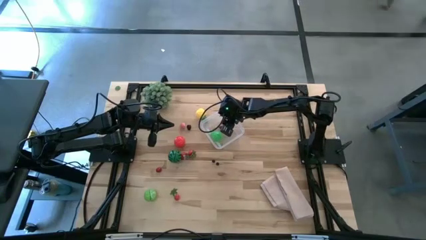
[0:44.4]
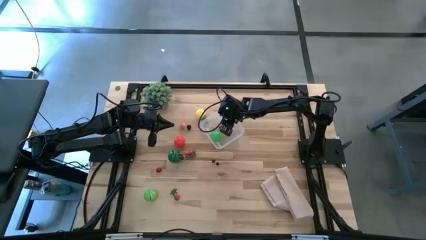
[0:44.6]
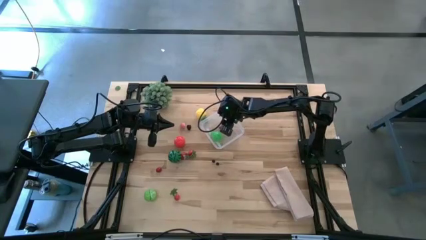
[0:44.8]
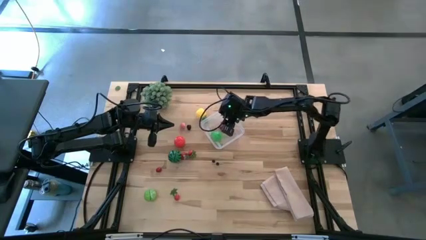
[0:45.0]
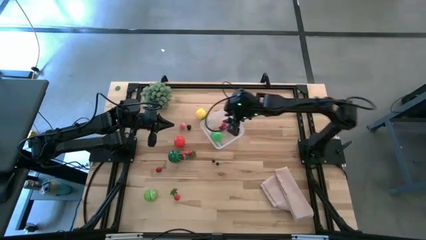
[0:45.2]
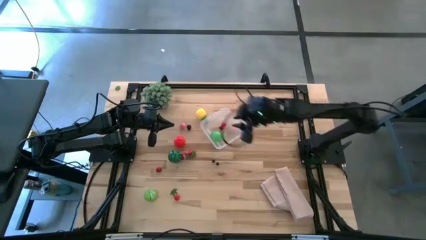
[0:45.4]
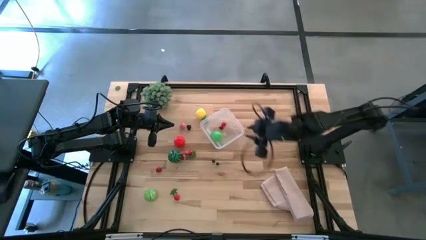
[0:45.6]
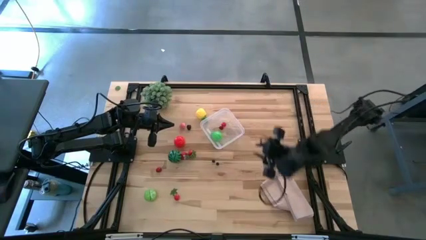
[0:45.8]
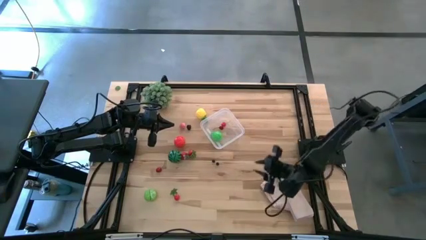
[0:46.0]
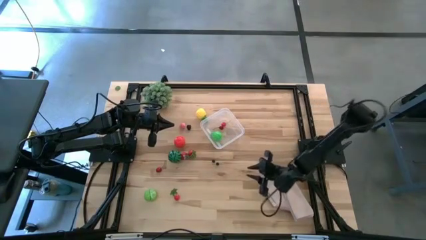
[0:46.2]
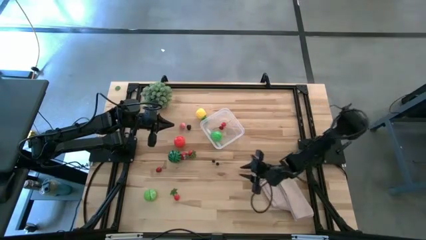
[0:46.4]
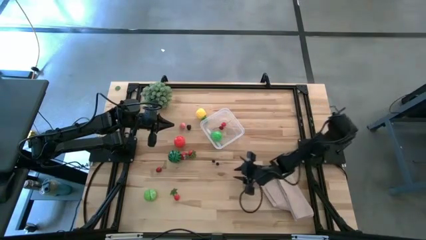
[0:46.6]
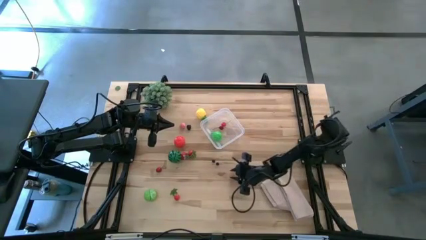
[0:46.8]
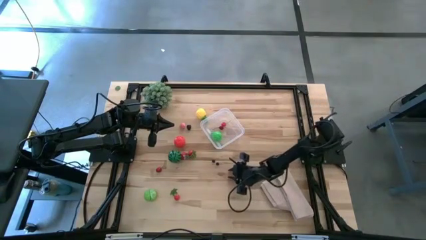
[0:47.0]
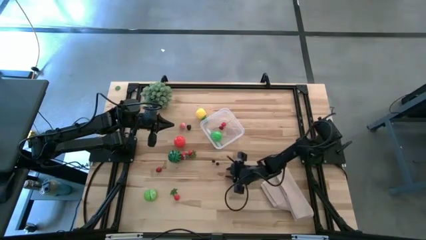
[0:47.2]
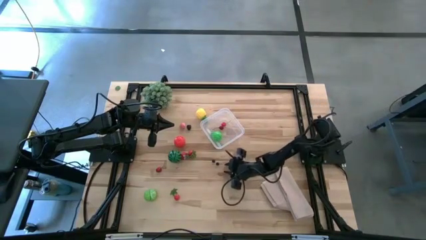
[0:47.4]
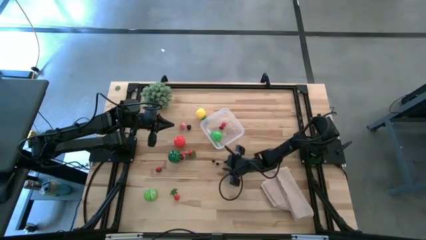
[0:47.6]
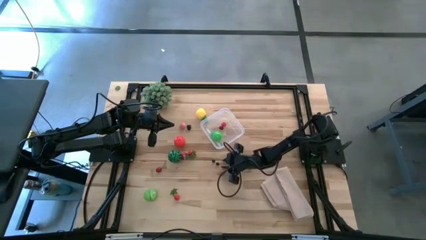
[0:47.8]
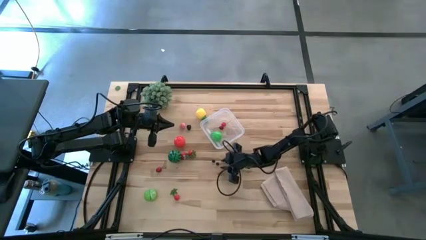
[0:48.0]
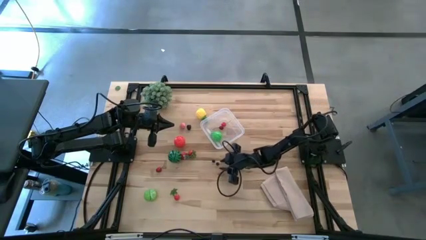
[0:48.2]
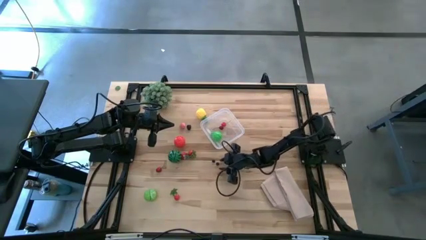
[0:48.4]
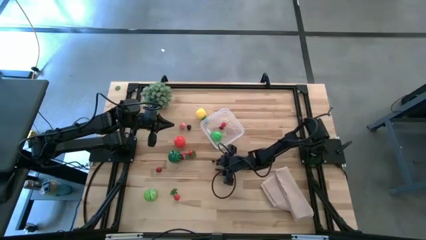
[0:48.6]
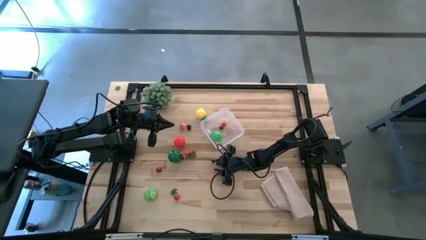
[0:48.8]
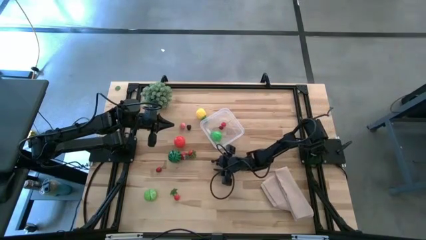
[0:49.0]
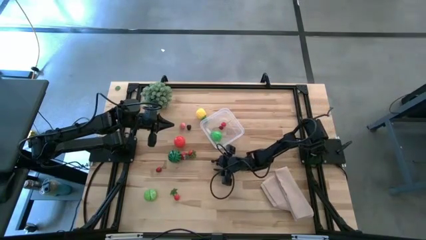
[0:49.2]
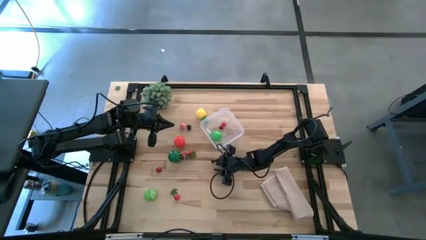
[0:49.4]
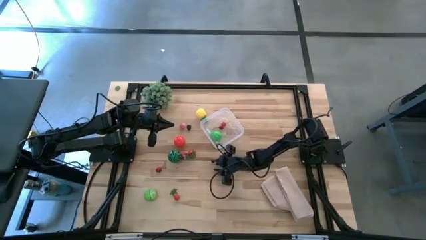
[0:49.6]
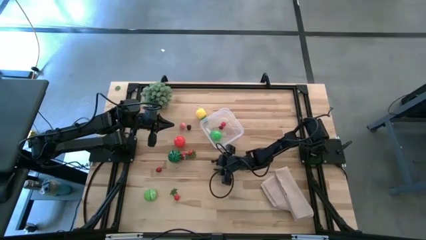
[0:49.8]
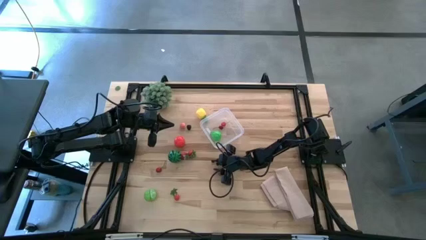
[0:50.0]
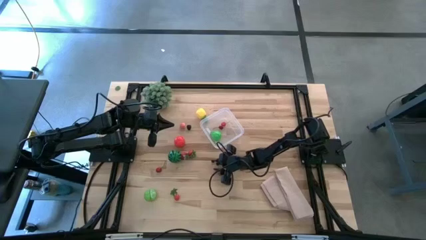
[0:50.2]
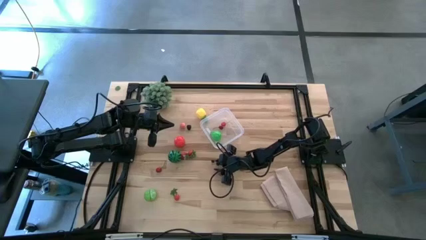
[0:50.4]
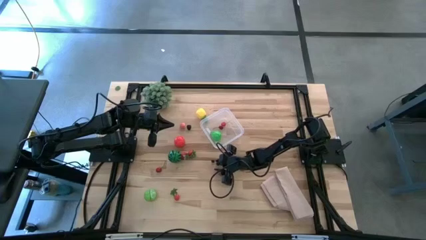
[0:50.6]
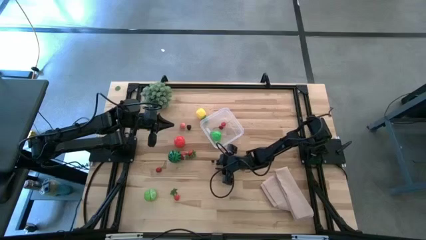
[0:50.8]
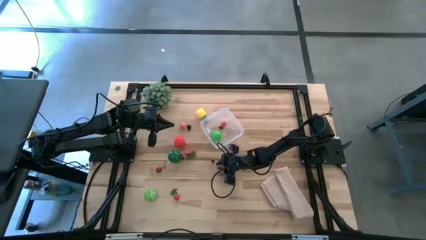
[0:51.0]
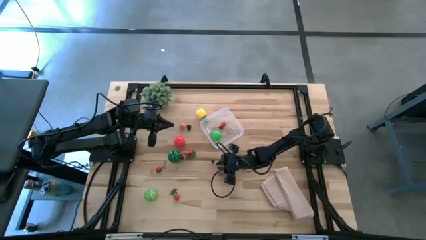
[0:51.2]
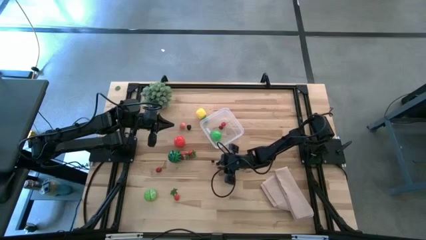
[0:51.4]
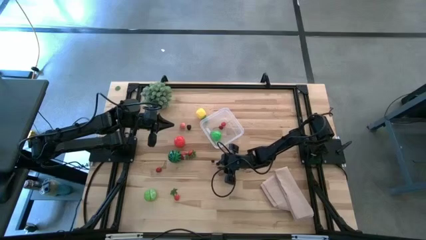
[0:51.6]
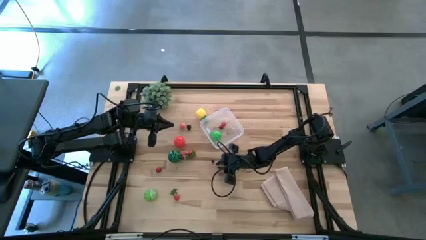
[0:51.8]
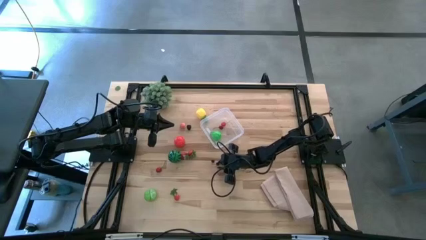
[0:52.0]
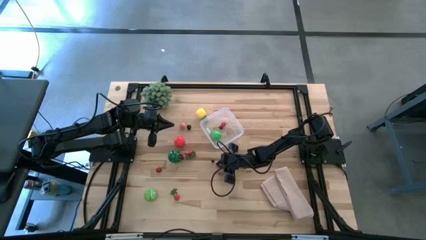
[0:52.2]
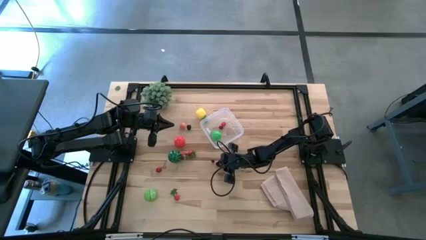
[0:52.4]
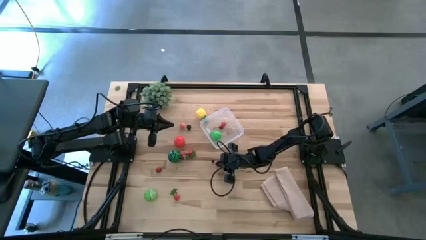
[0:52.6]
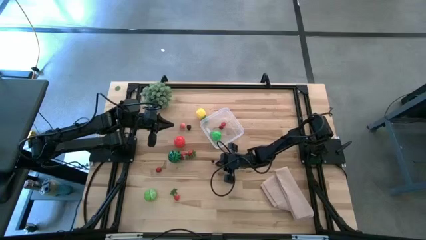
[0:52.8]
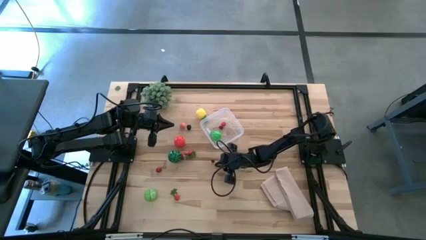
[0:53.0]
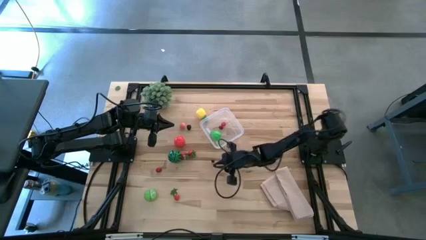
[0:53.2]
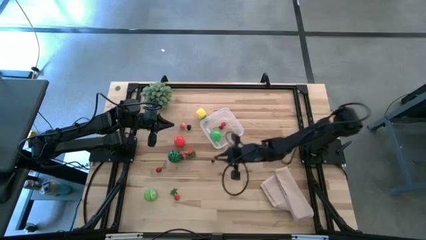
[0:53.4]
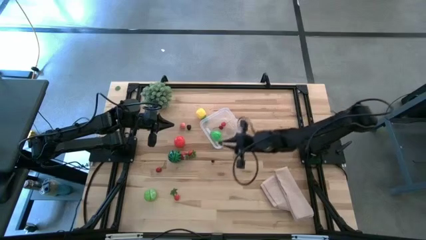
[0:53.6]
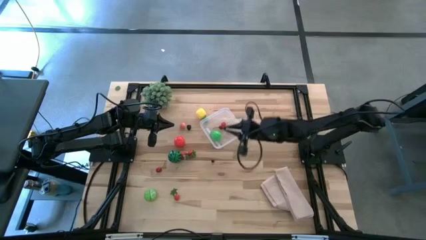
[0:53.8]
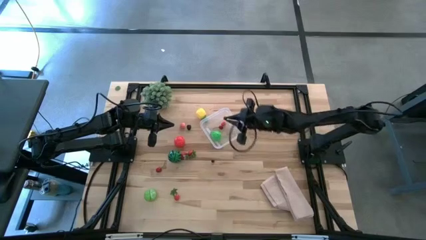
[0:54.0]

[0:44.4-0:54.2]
Task: Pick and placing Produce into tupperware
Put the blueberry into the transparent bin

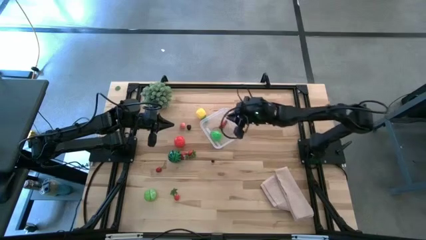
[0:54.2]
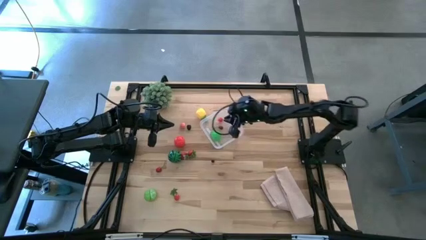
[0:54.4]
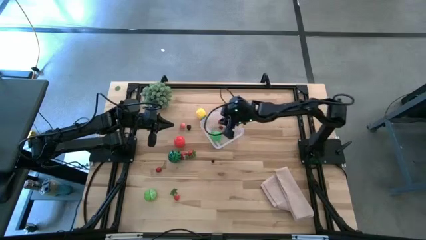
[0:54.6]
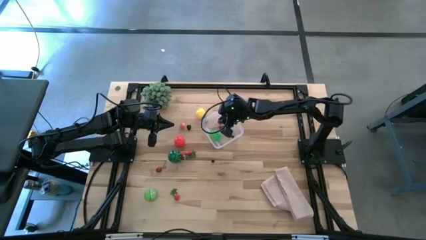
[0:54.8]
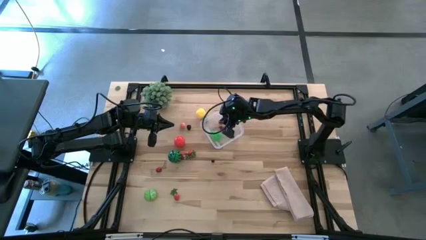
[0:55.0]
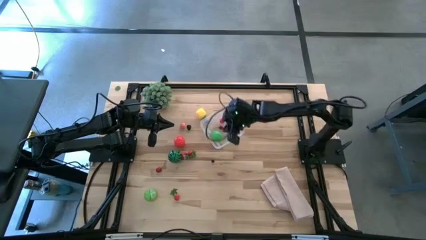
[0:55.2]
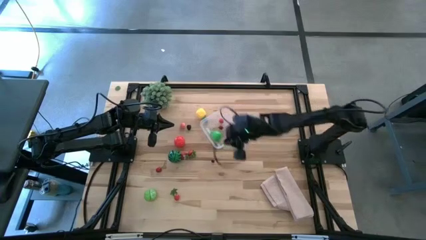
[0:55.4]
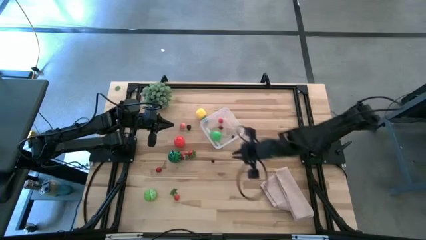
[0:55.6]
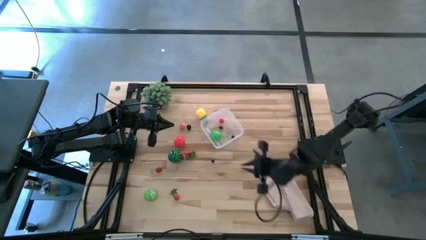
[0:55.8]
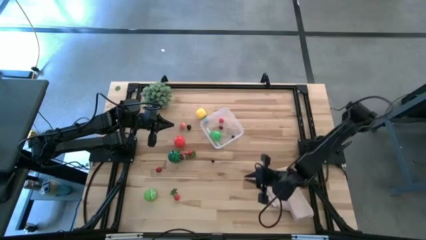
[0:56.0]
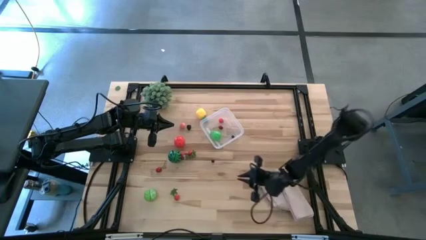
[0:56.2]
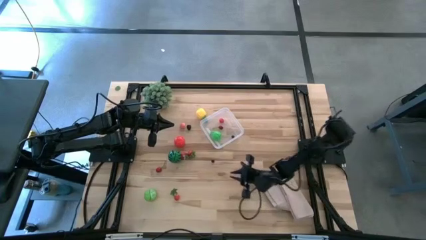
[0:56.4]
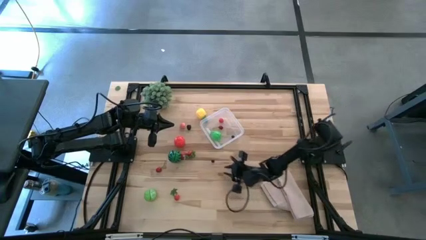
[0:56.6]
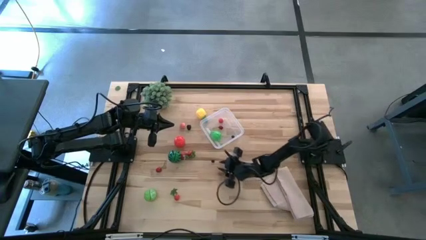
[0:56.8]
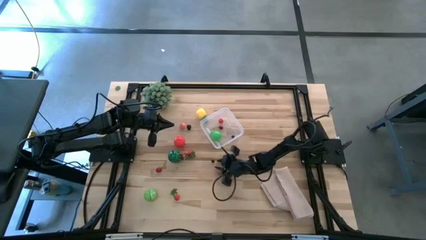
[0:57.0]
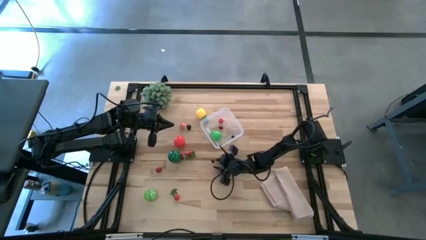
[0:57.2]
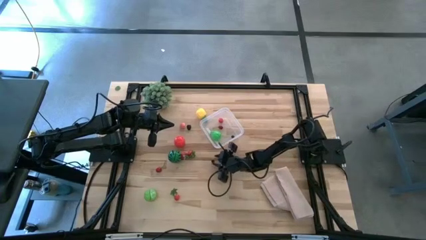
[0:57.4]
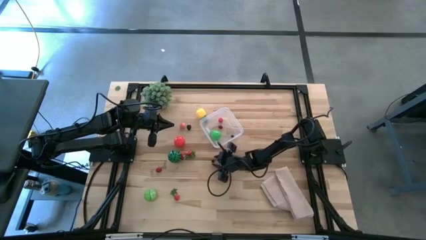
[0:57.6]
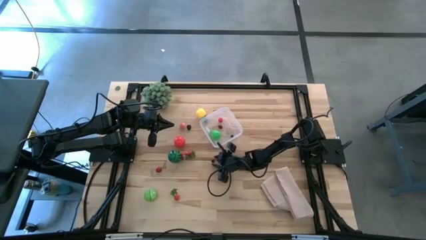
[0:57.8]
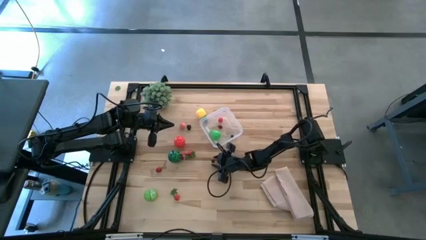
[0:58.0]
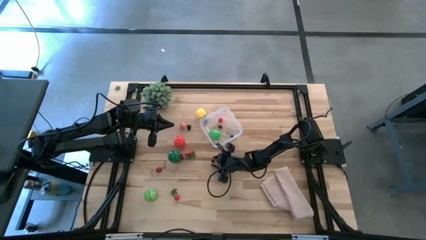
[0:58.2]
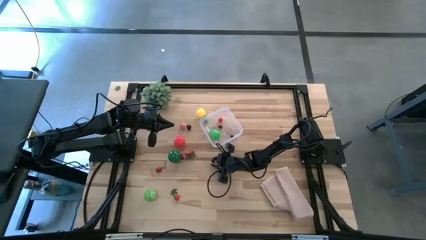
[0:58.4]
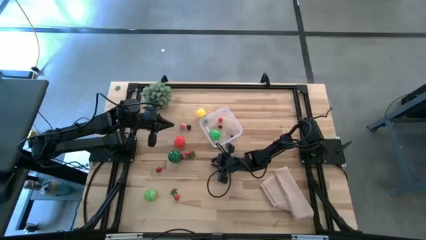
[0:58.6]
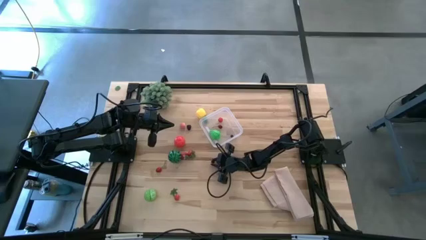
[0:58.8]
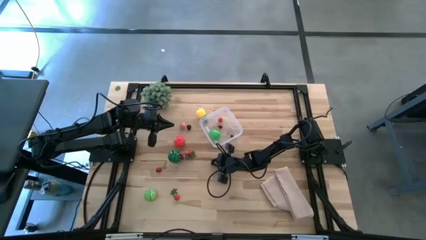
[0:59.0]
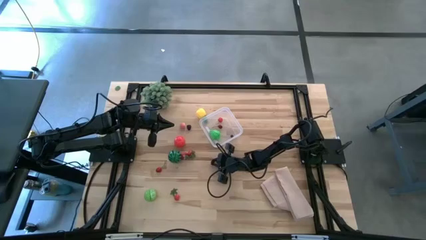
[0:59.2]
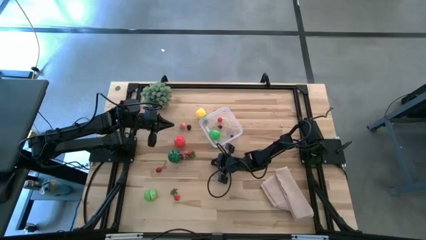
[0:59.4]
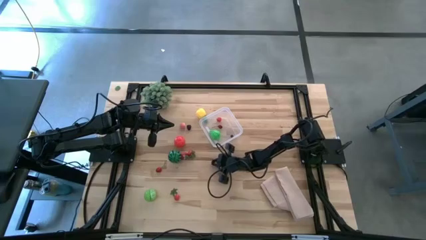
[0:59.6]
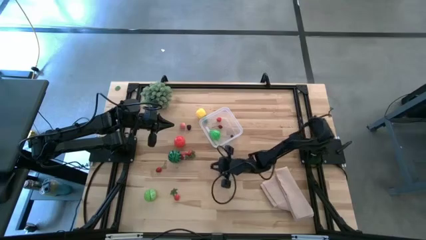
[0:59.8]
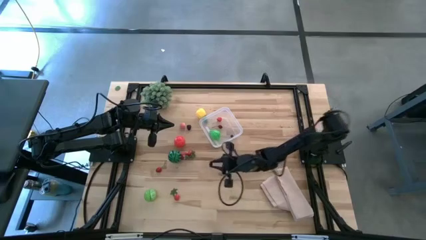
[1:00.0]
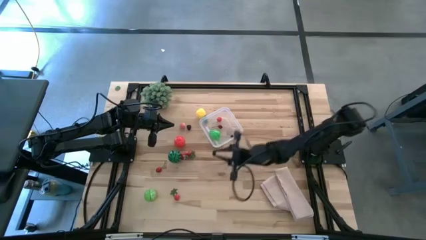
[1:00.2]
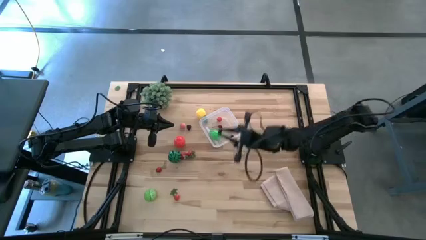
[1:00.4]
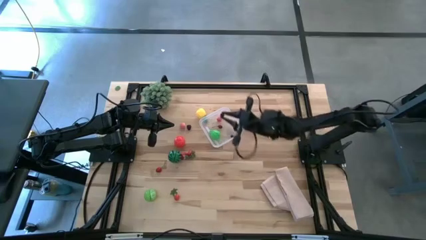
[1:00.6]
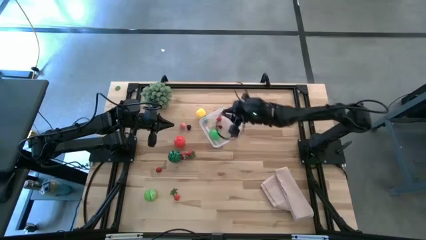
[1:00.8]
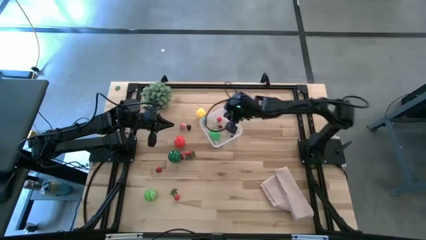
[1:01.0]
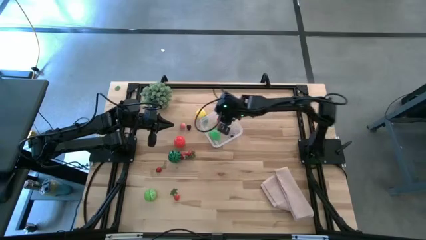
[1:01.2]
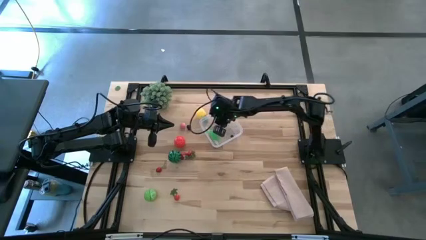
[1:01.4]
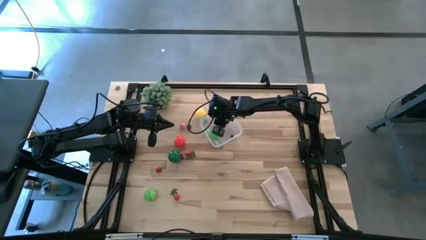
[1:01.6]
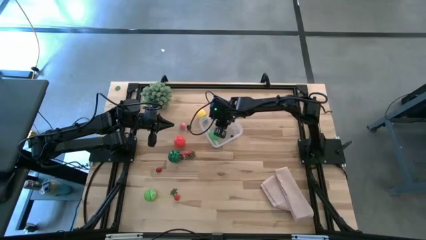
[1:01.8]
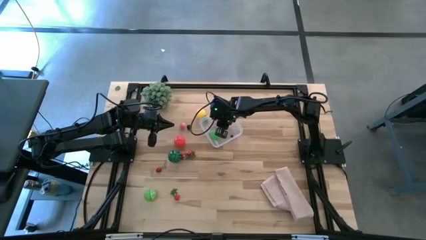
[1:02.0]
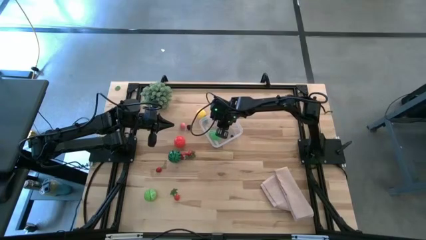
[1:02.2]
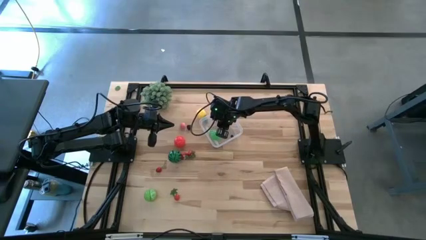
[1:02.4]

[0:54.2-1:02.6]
Put the blueberry into the the transparent bin
